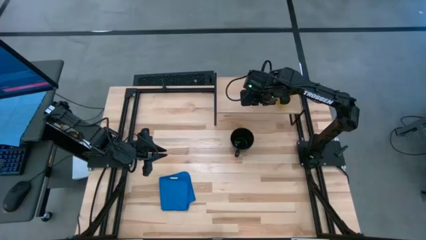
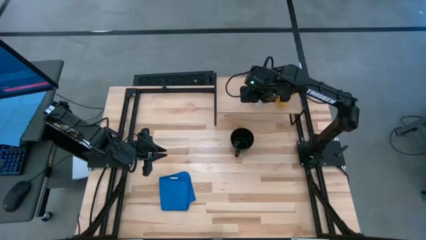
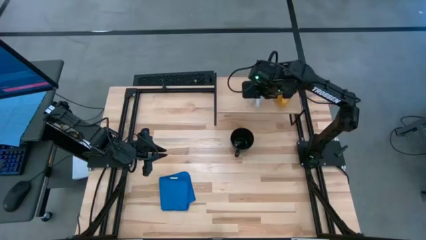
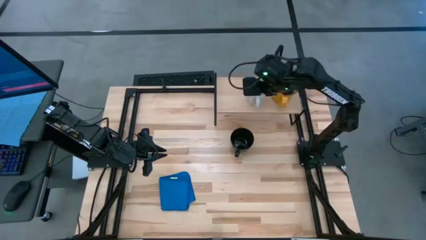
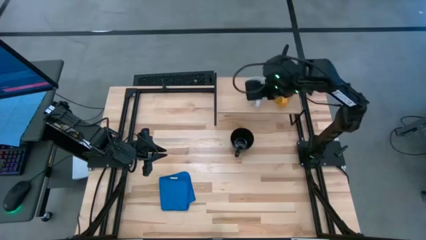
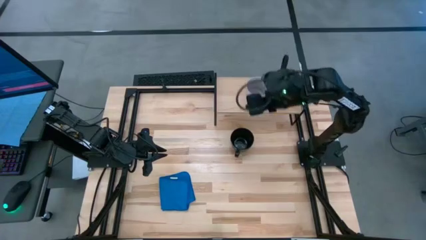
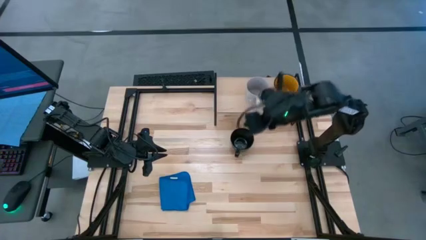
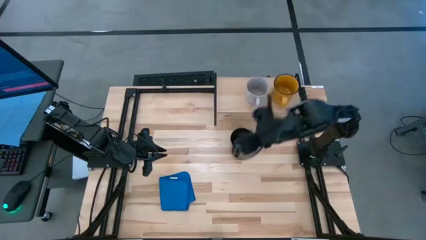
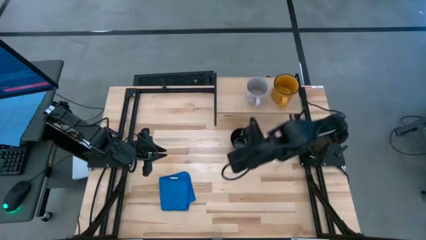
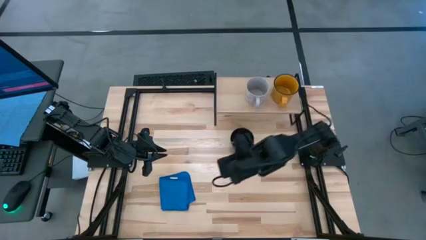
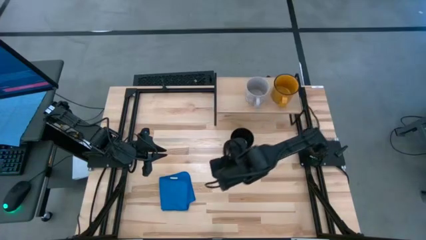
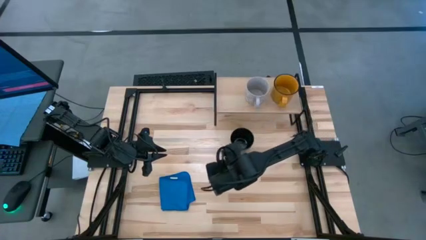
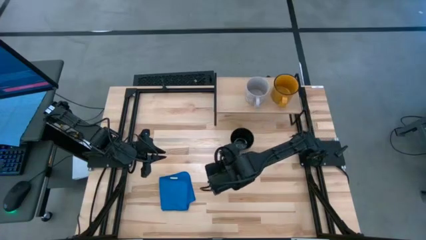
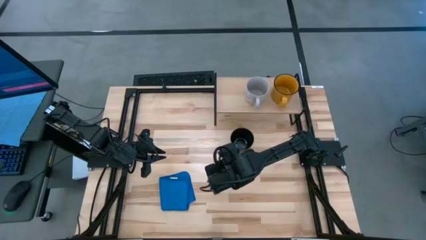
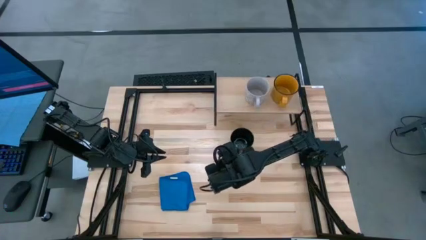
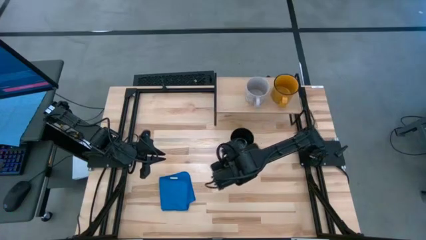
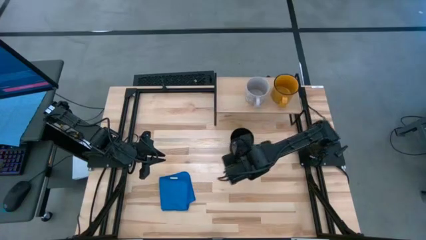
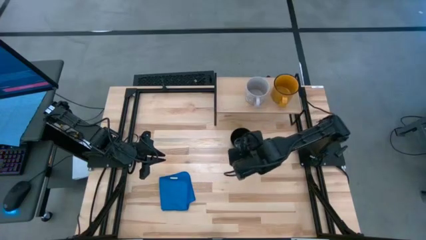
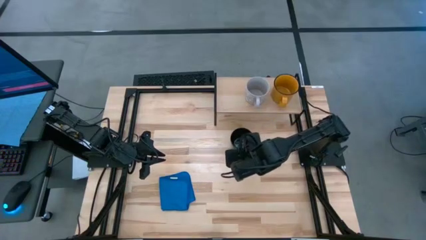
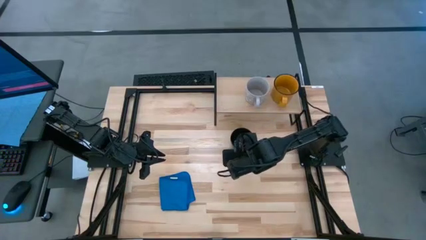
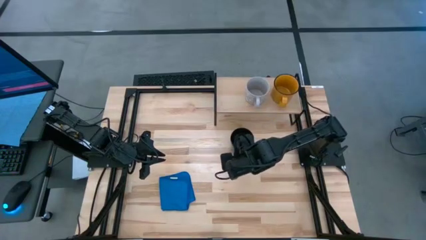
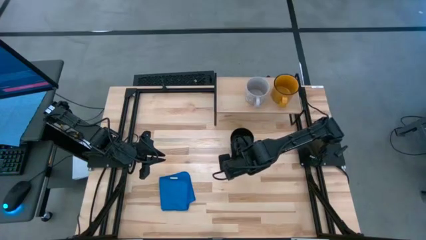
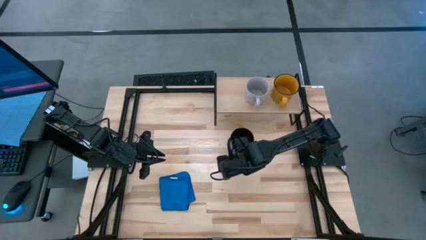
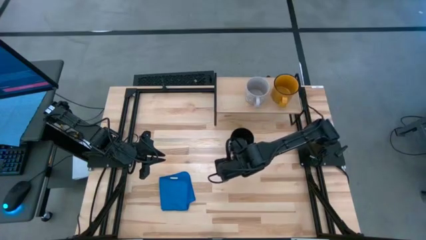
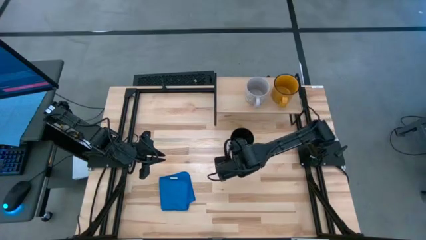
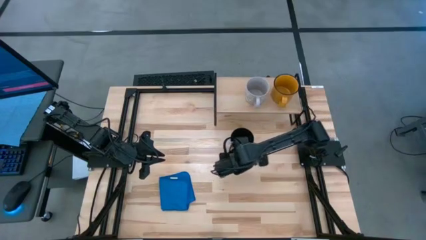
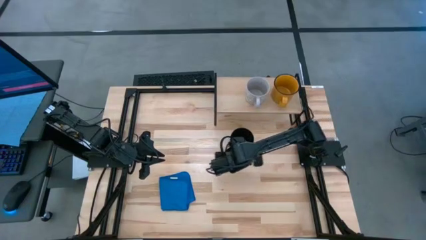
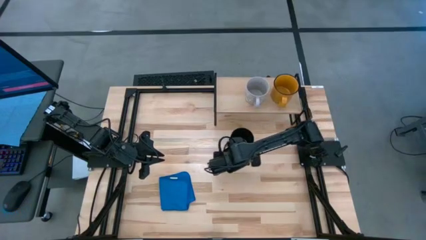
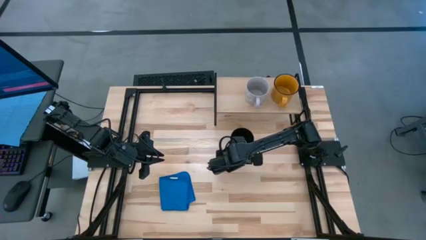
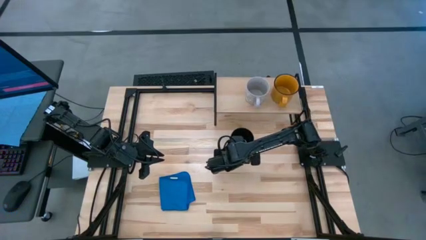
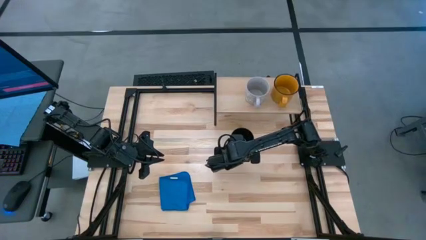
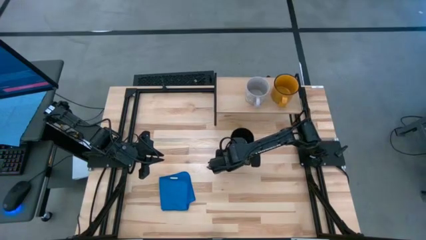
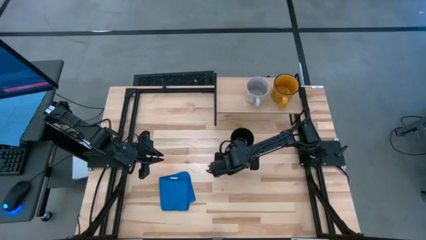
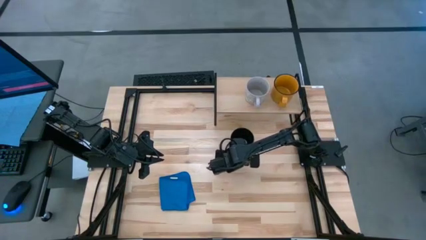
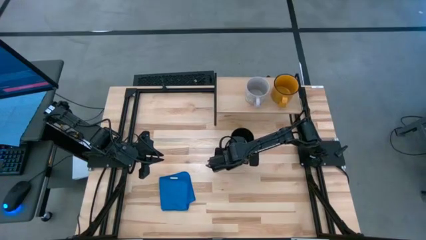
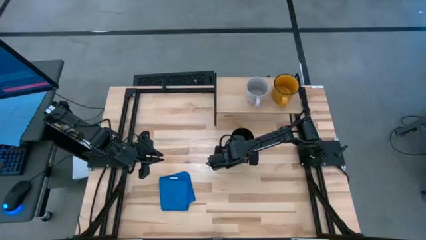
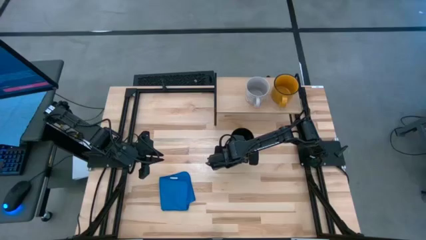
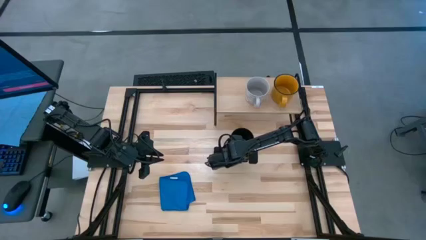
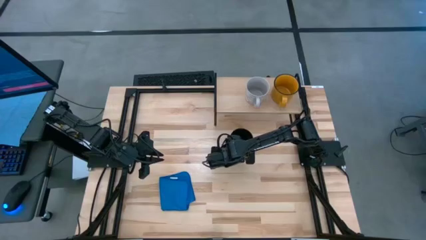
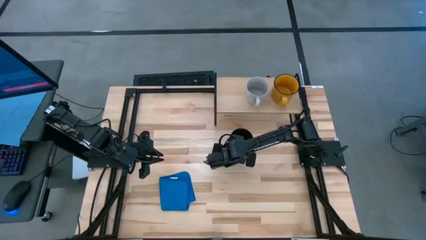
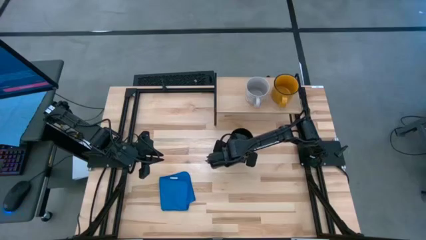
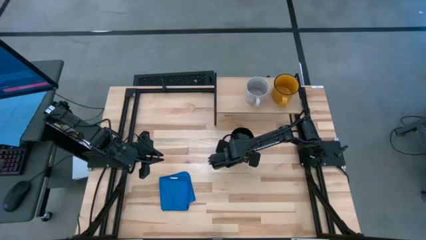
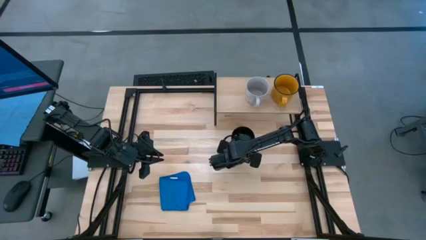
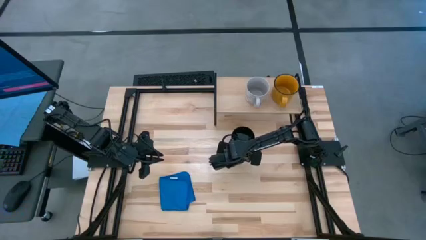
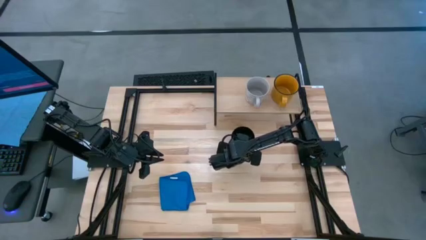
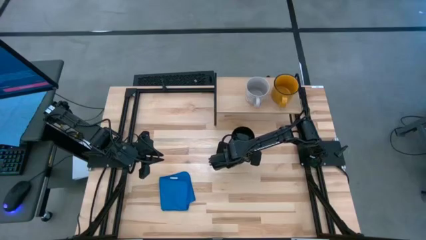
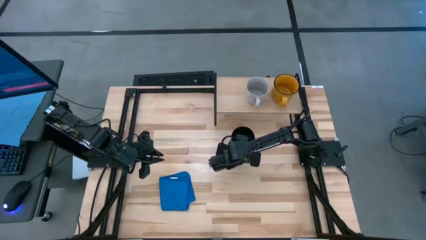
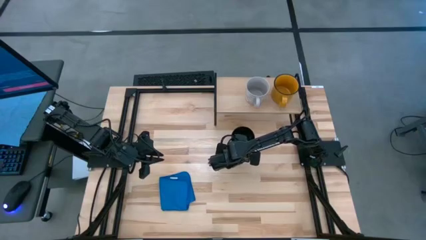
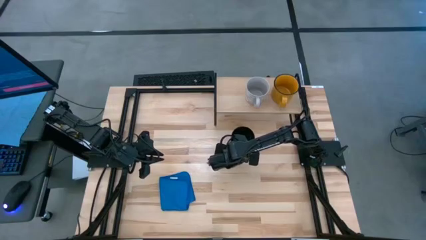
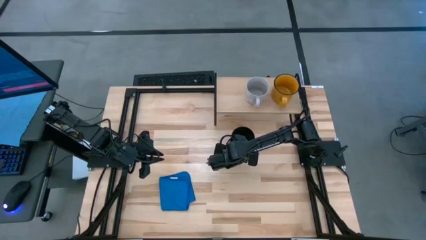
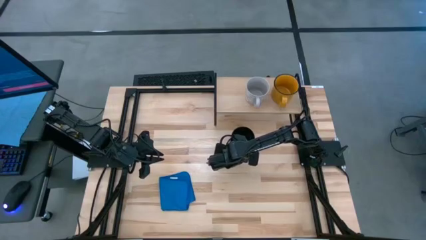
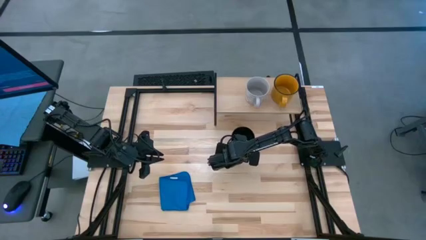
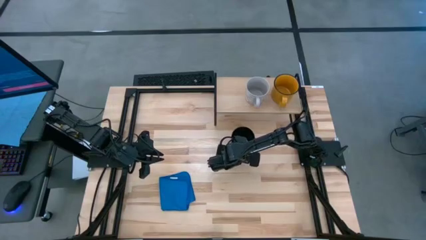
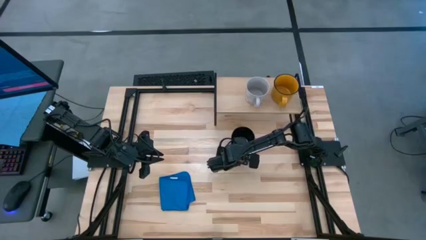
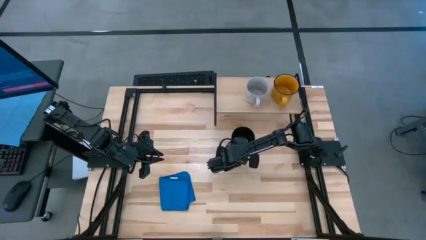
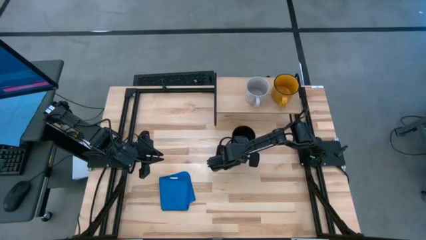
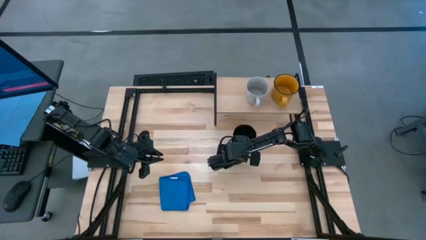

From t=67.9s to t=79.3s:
Task: Stack small to large cups/mugs on shelf
Put the black mug on the shelf

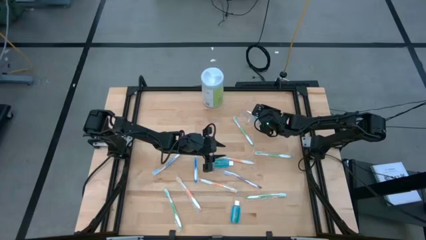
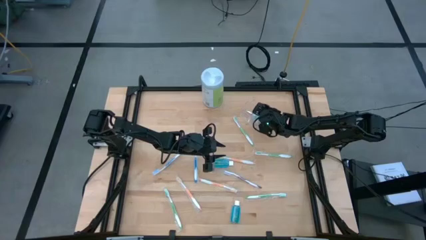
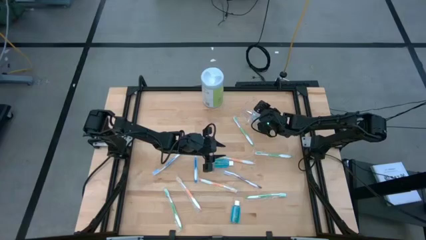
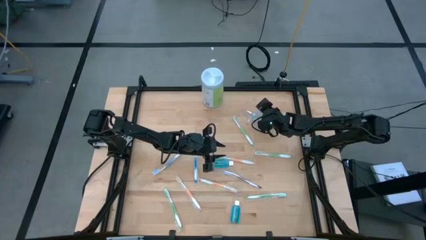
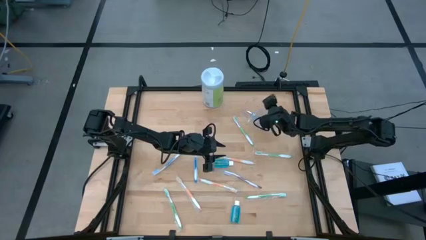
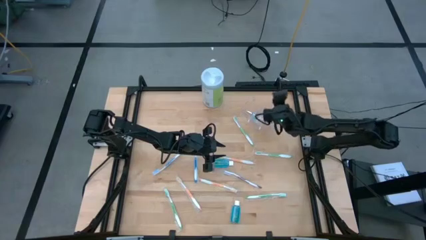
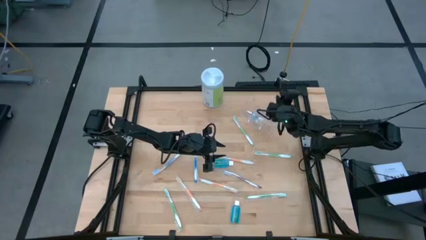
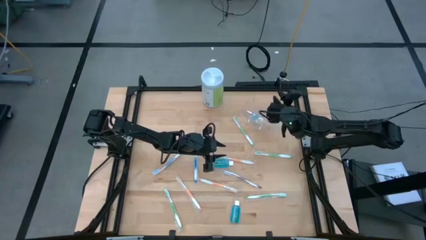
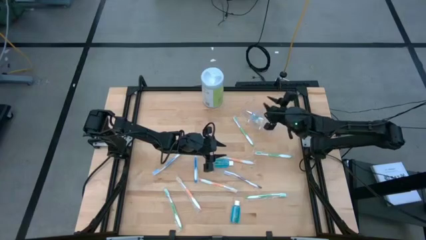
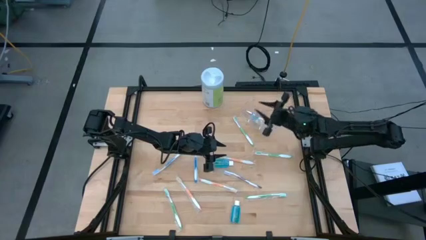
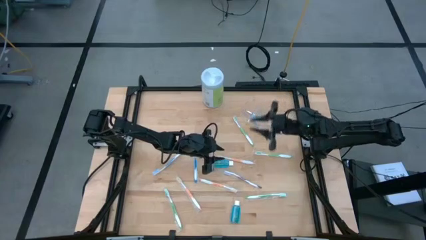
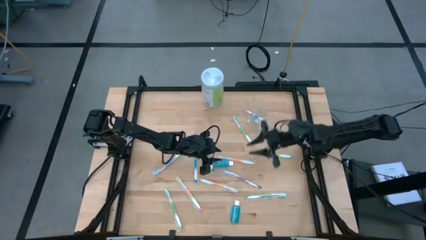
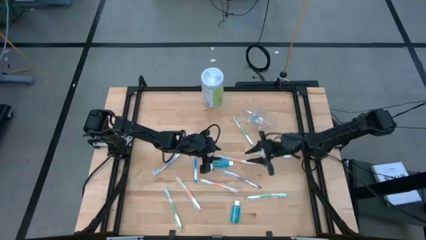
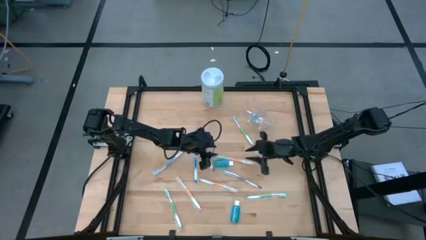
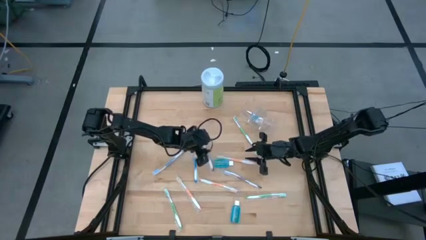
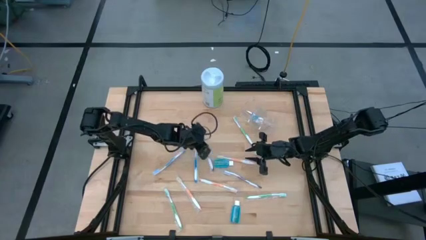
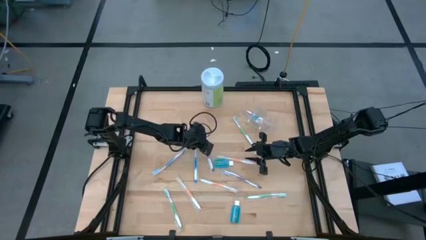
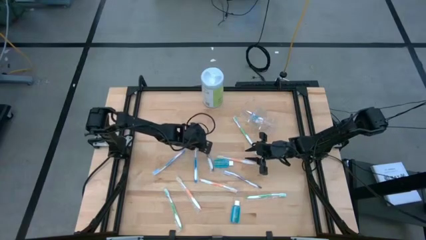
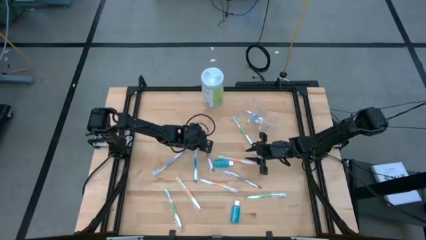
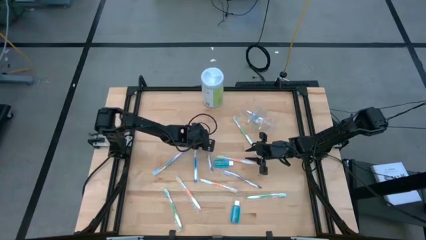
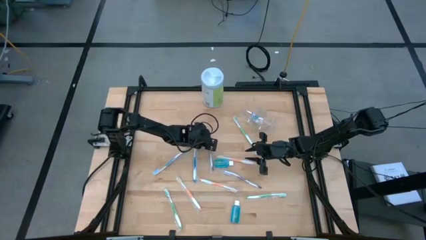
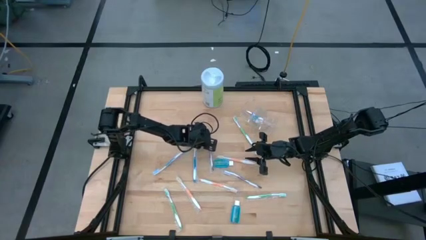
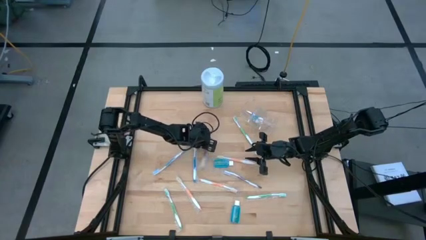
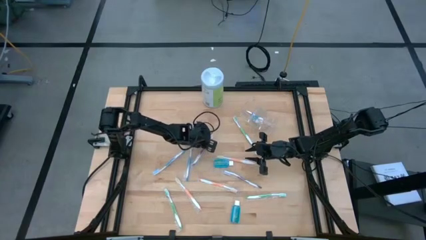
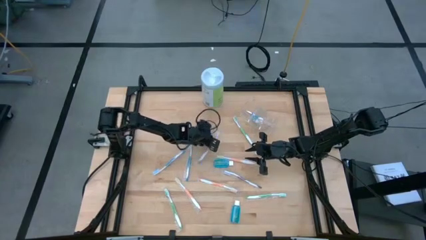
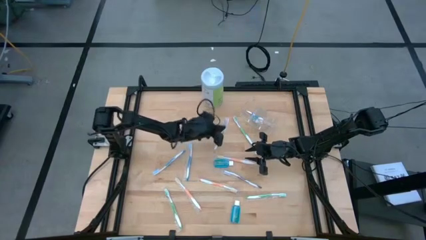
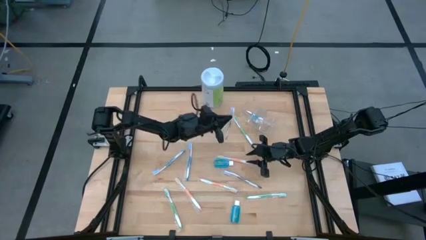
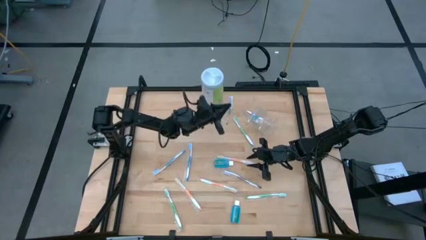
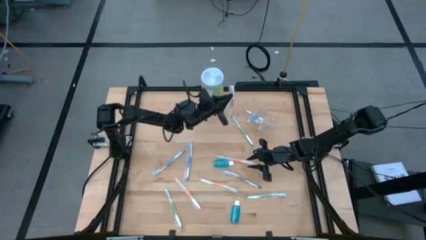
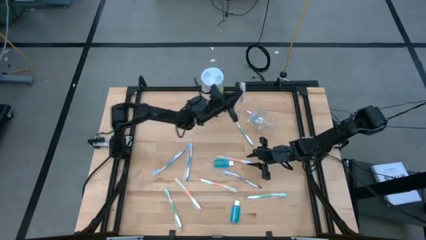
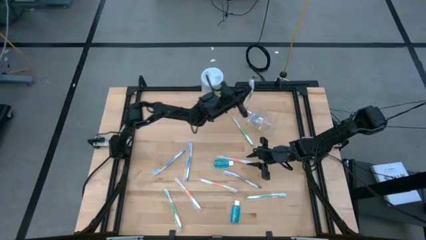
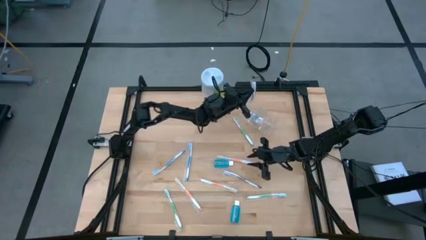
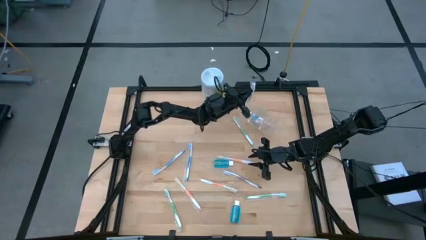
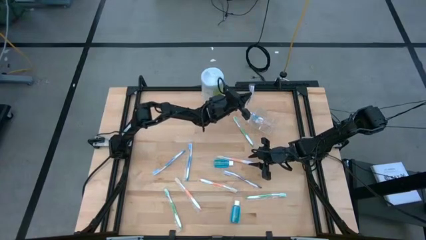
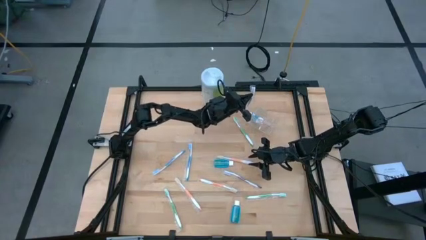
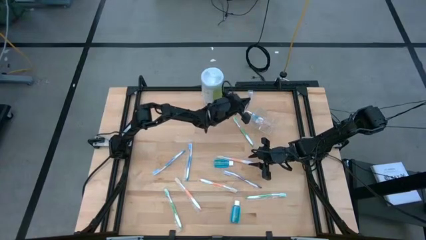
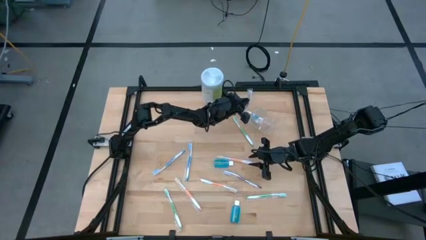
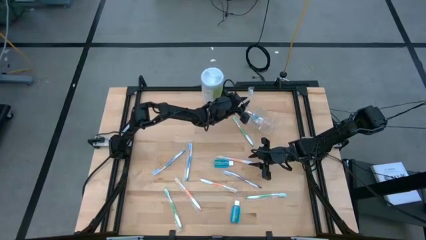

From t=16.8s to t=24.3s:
Task: Pick & Place toothbrushing station
Put the purple toothbrush into the transparent organizer
